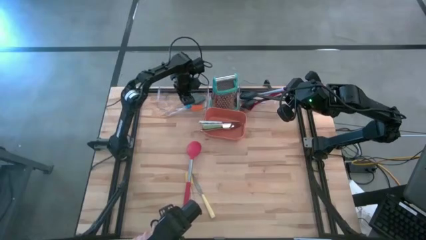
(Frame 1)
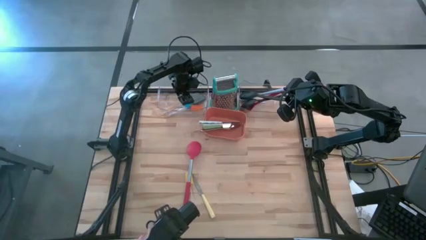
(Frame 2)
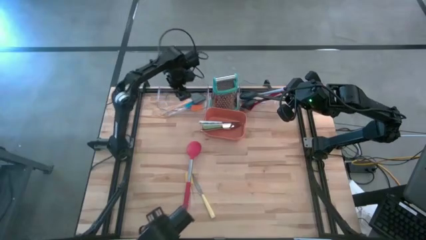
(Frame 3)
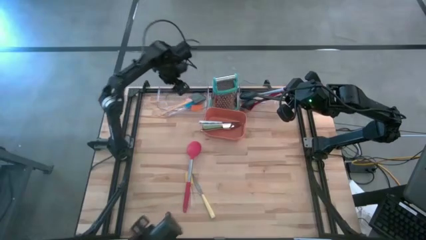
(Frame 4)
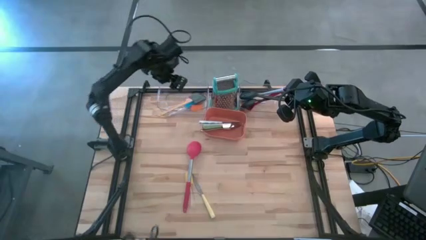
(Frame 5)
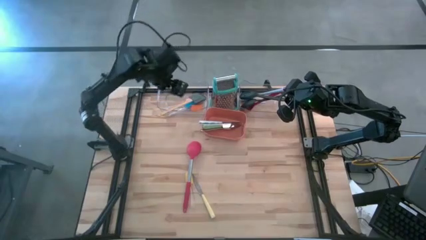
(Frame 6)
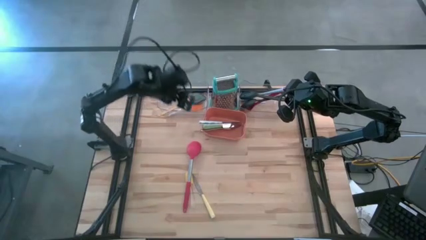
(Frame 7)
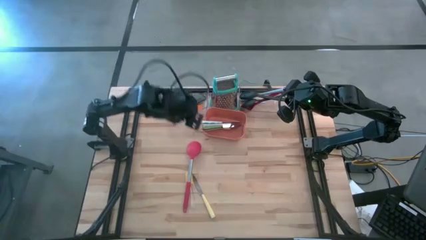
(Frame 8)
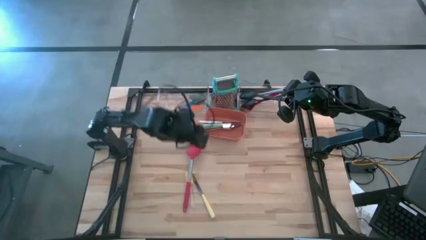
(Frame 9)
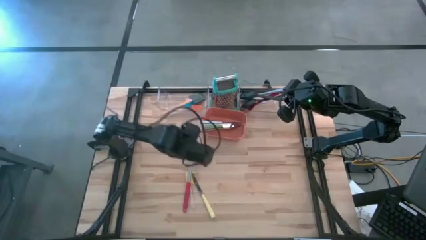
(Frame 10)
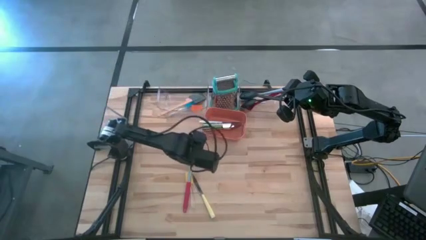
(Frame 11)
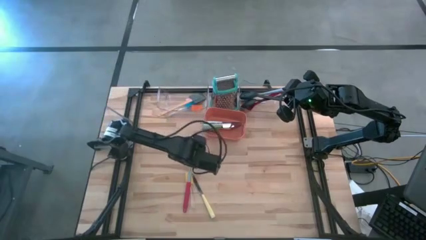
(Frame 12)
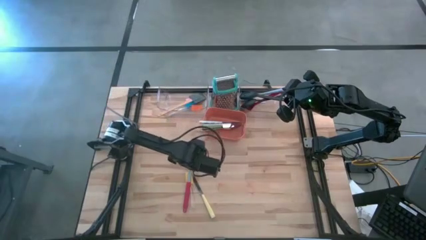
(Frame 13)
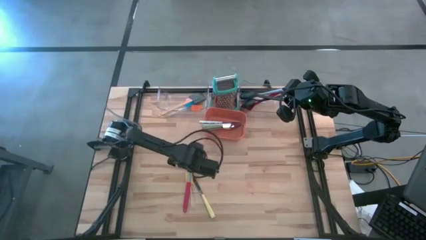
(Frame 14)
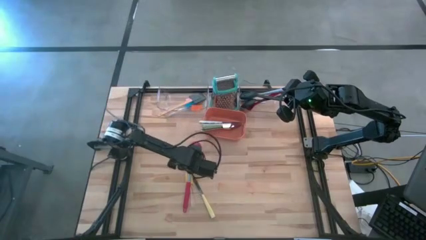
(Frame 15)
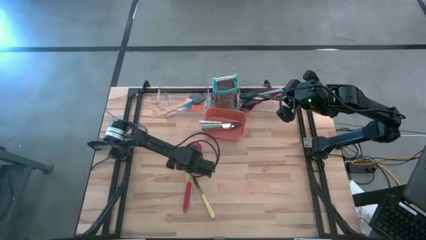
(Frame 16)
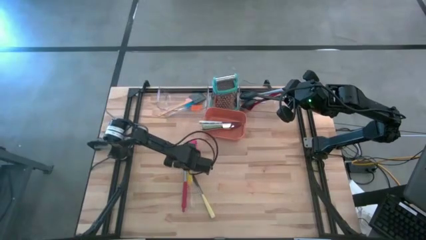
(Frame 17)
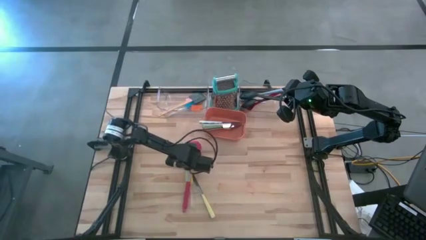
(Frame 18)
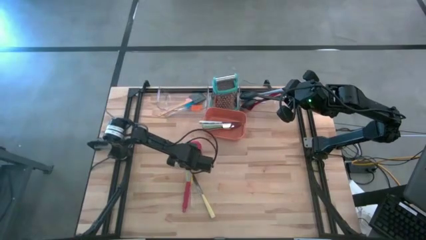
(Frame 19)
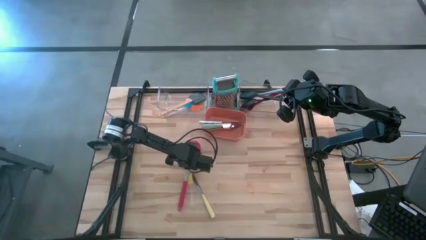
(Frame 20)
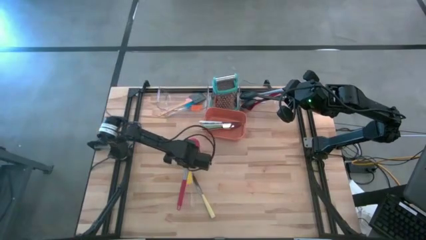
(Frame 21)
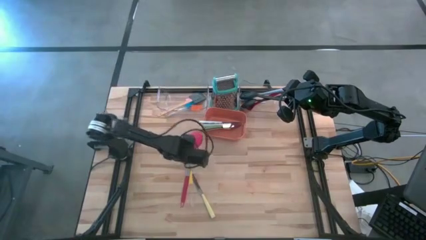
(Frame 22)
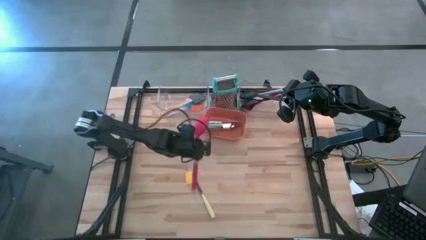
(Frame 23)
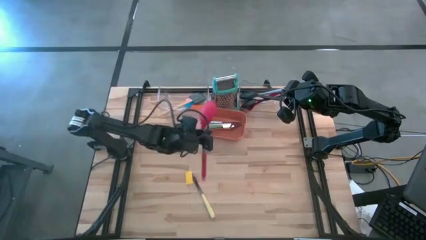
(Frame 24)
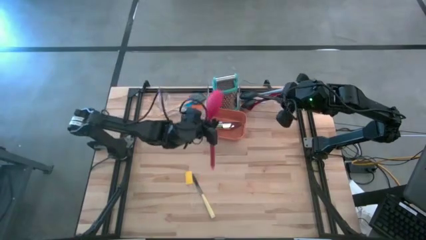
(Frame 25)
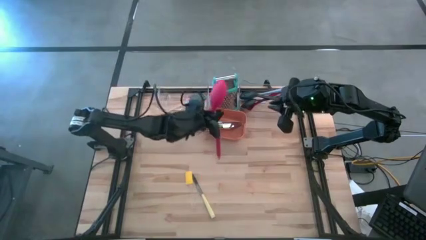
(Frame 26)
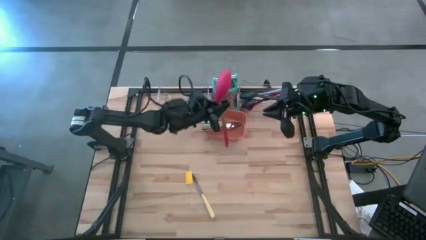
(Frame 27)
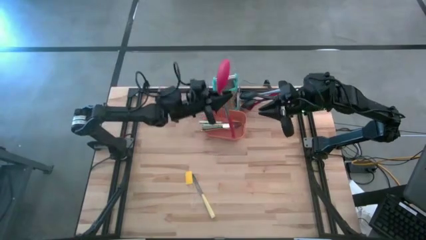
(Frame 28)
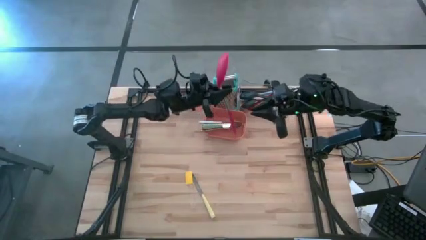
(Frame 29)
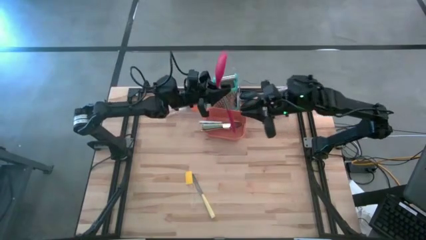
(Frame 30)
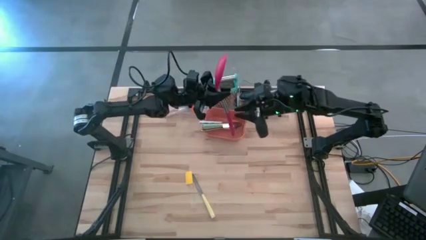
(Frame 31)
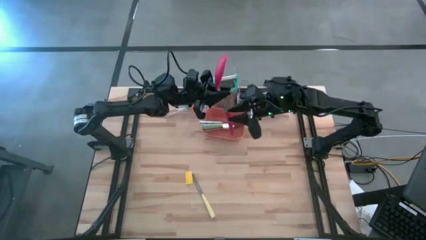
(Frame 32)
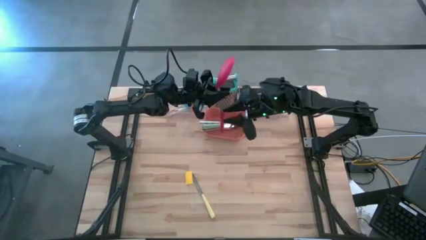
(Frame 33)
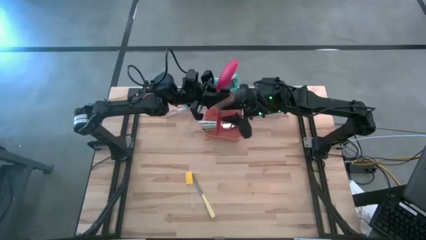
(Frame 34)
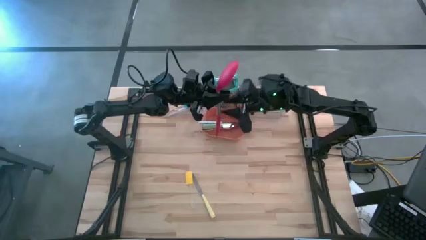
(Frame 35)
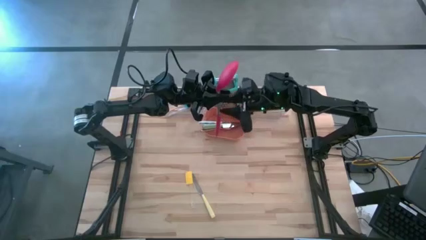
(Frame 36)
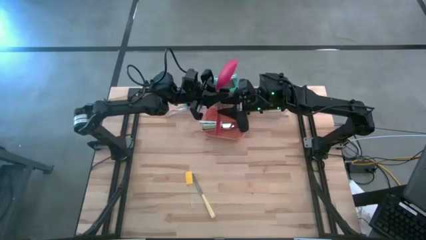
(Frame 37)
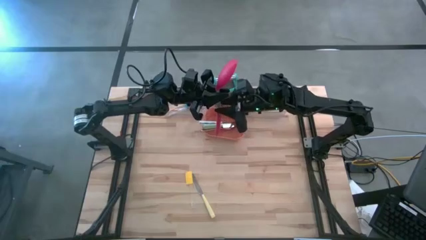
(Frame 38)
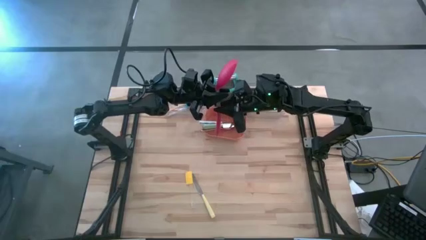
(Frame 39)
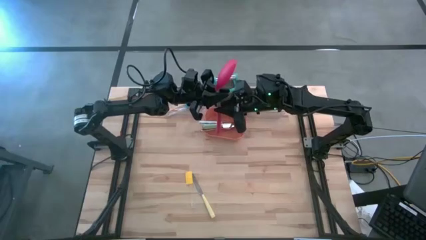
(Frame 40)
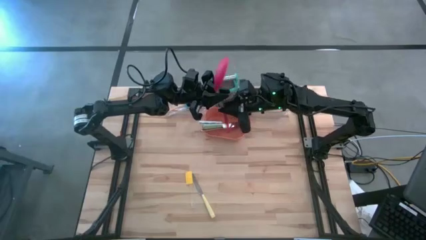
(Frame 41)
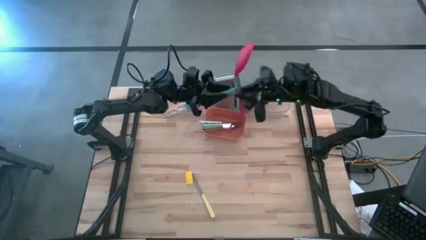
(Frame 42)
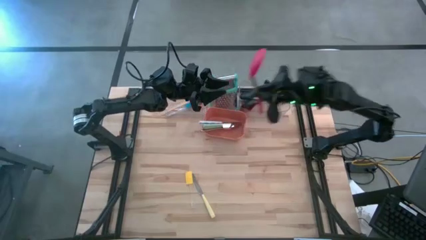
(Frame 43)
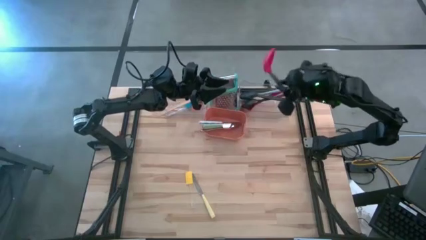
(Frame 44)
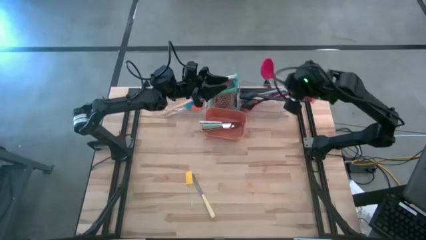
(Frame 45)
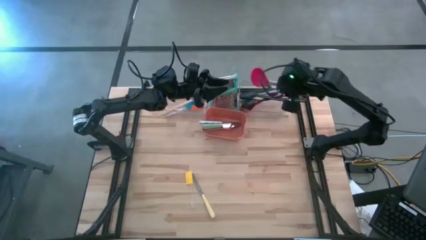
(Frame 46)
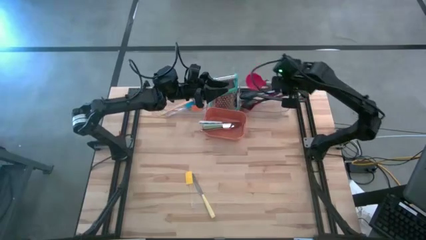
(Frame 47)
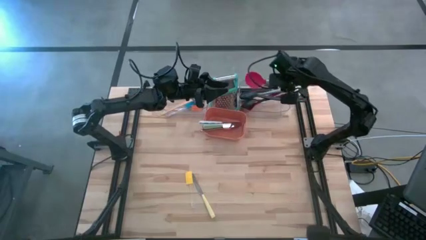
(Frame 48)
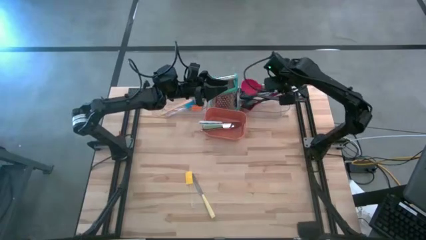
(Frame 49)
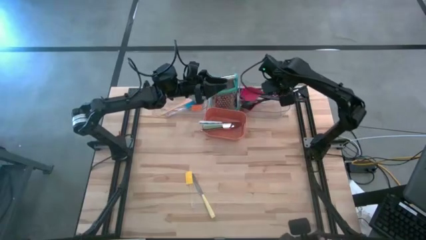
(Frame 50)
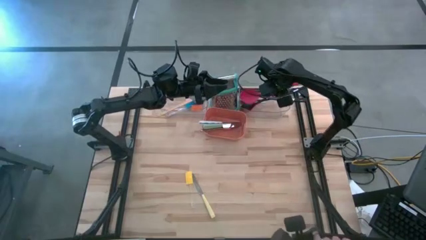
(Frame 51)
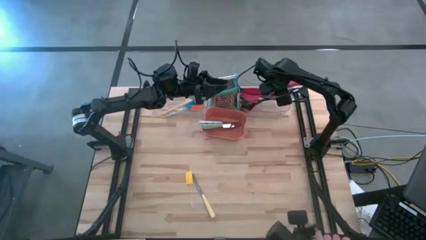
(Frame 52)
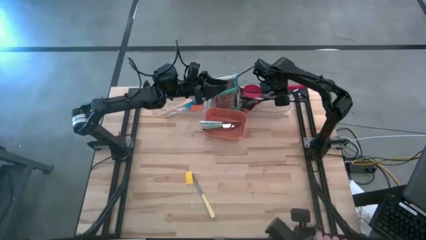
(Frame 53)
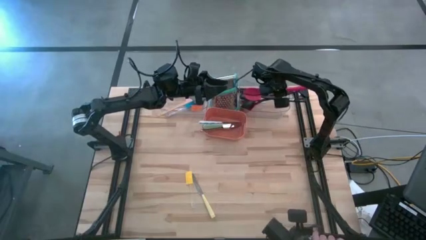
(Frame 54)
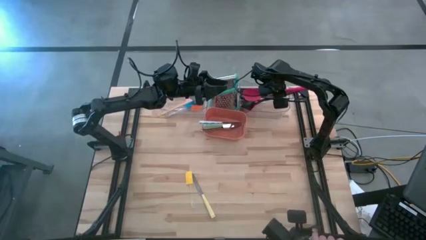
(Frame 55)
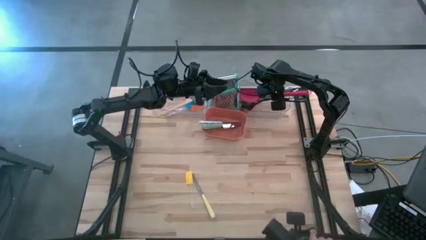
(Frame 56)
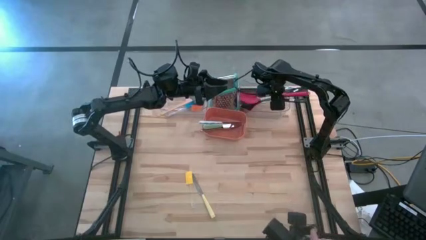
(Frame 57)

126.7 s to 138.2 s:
Task: Pick & Place Kitchen Items
Put the red serving spoon into the right transparent bin

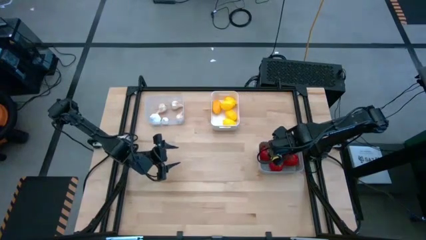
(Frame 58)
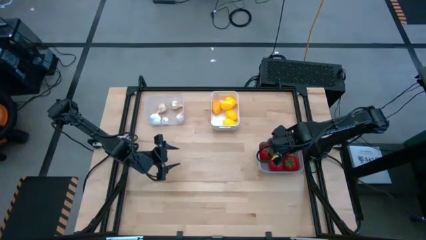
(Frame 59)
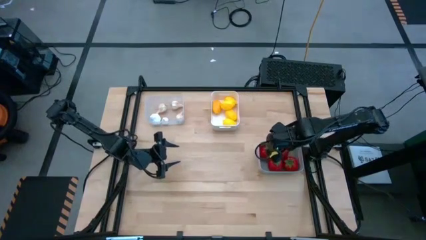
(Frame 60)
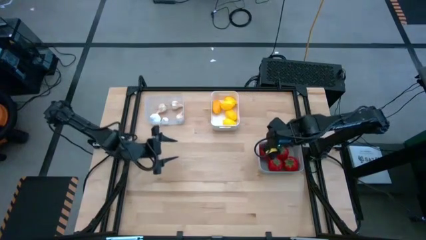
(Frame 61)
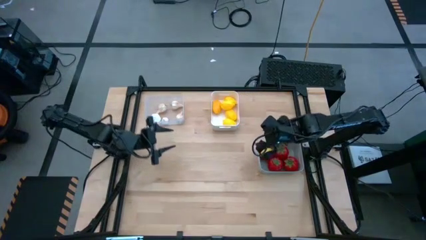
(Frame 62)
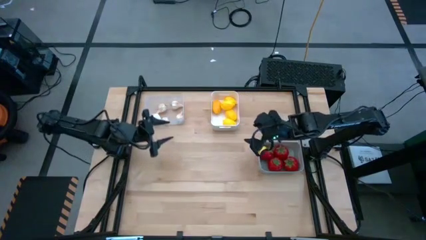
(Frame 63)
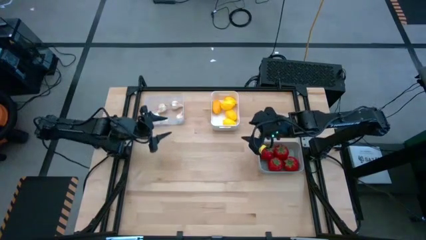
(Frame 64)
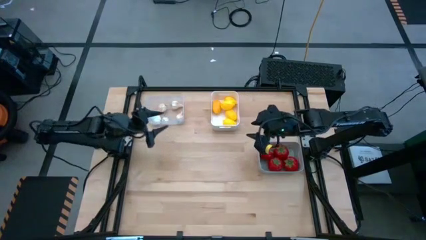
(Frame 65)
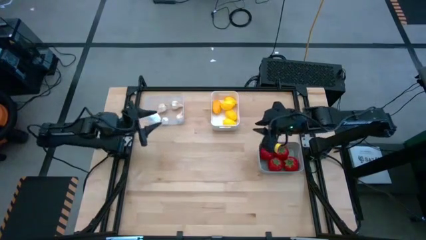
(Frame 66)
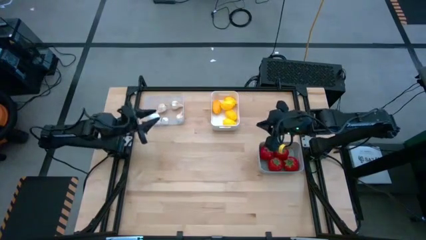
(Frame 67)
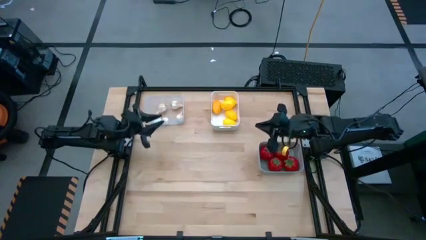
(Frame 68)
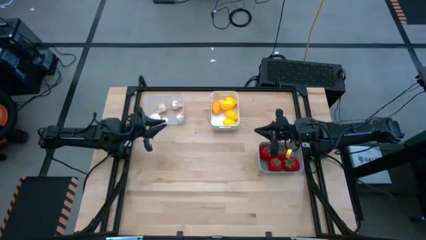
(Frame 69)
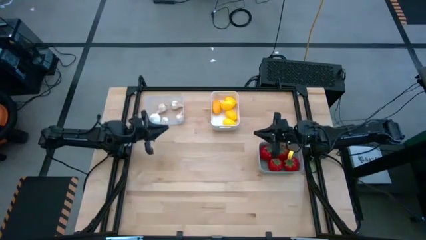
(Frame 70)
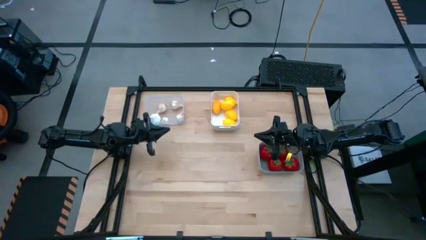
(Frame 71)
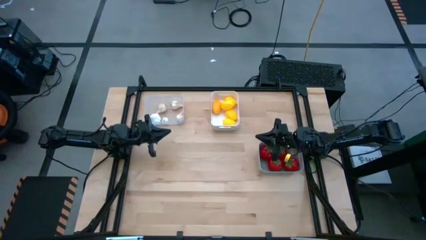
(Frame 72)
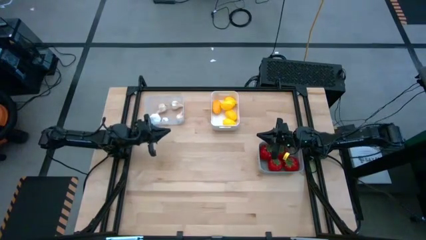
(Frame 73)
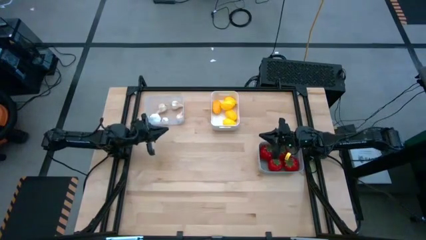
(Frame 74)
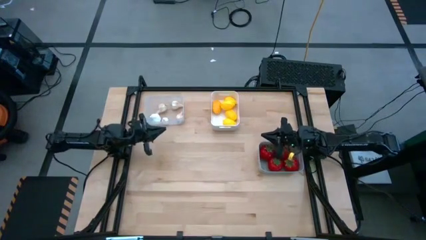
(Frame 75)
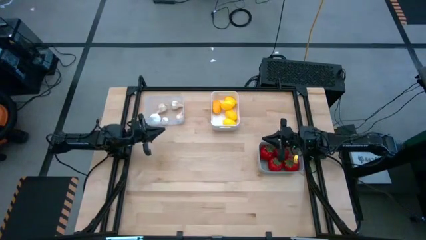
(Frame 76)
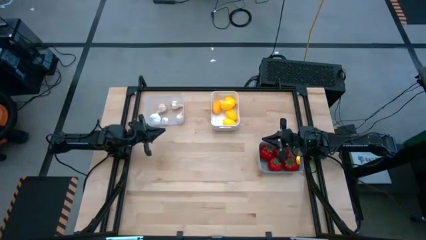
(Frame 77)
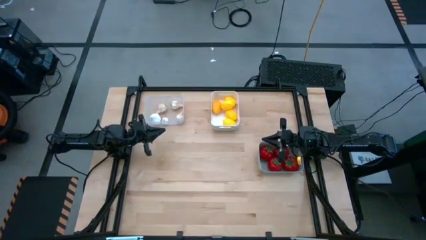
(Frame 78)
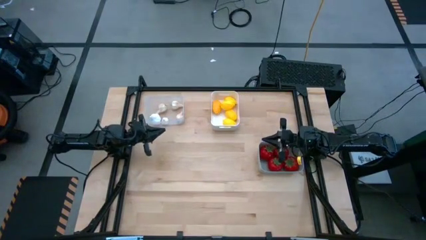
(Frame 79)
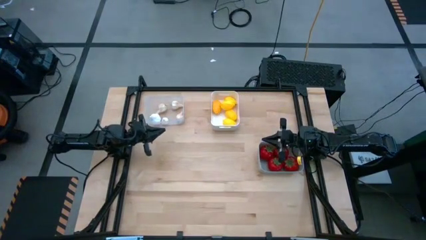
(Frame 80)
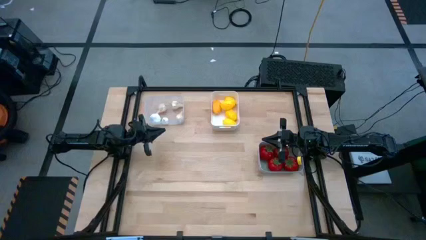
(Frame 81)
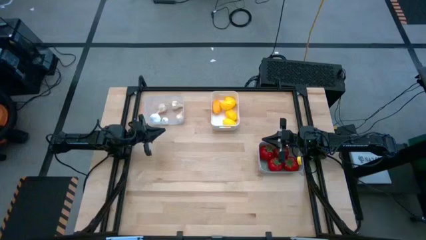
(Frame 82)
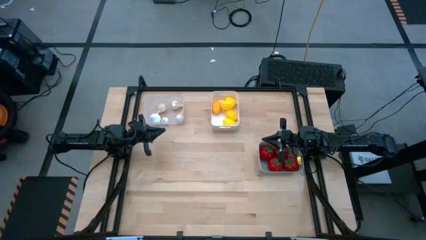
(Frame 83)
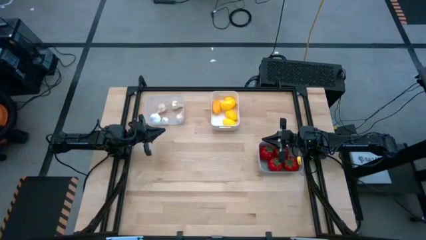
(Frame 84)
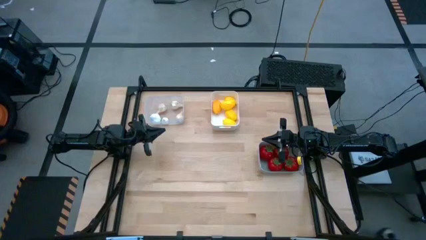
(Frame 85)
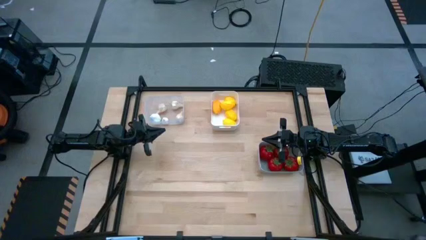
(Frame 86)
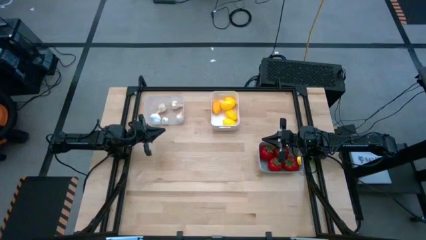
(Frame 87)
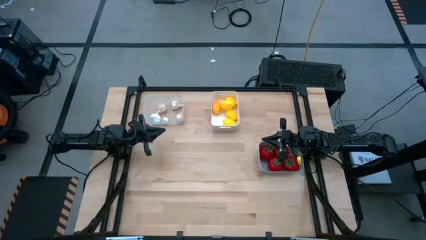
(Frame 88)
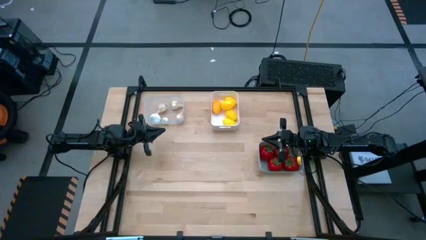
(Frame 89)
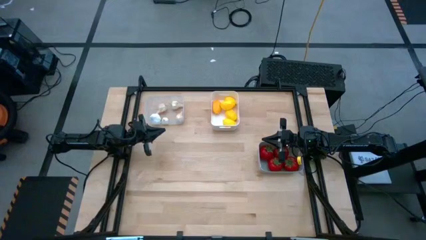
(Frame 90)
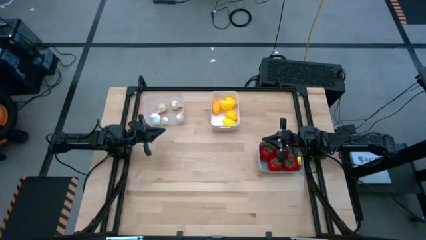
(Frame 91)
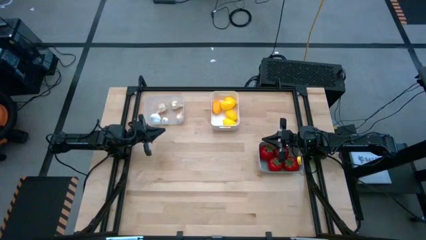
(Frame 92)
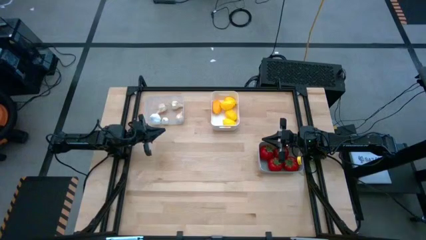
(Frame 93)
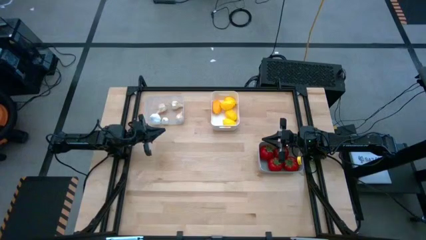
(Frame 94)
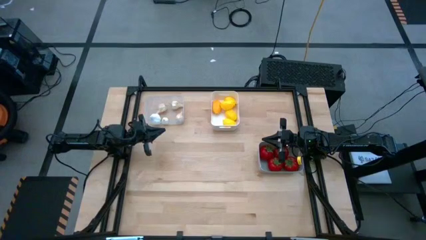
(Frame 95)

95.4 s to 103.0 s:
Task: Sort produce into baskets
Return to Home Position
